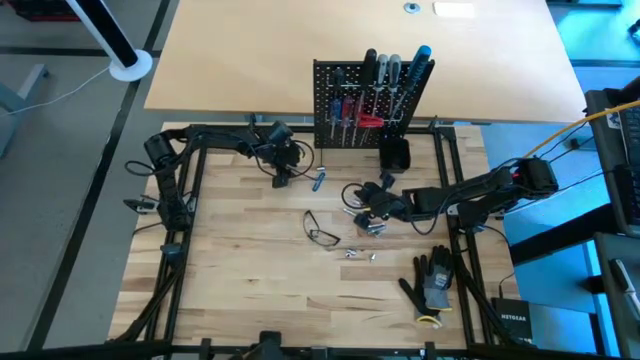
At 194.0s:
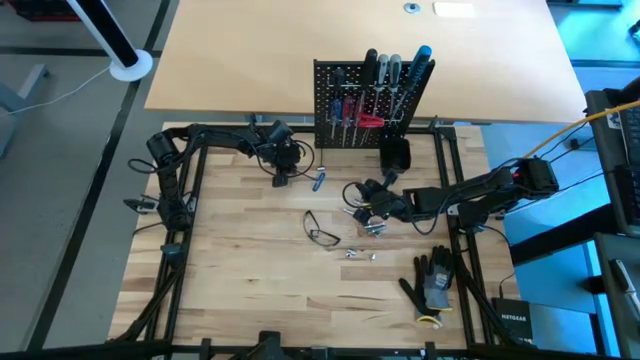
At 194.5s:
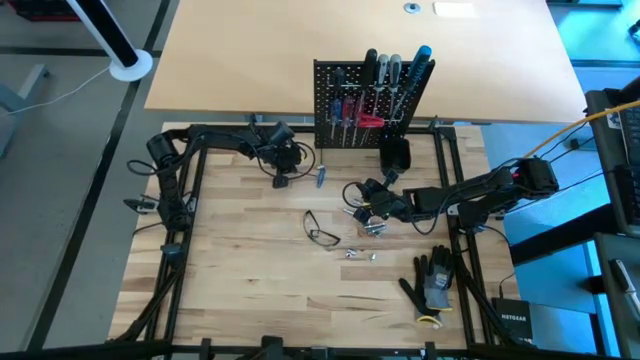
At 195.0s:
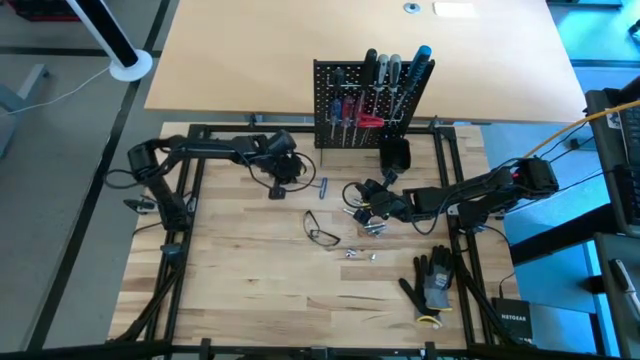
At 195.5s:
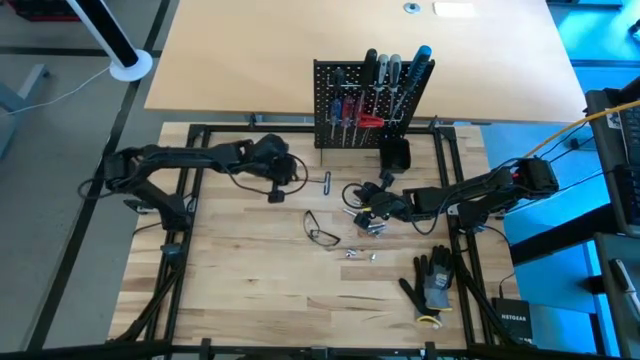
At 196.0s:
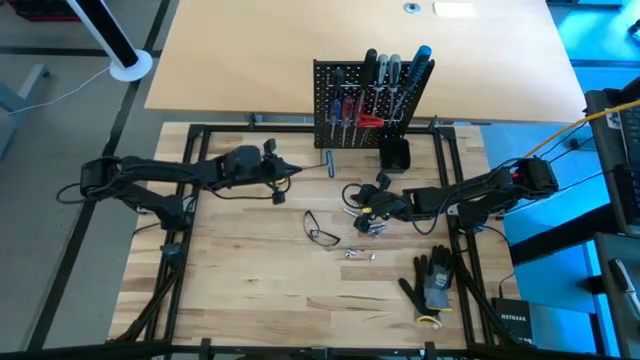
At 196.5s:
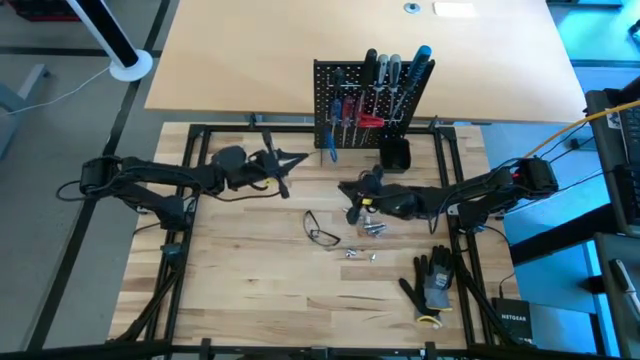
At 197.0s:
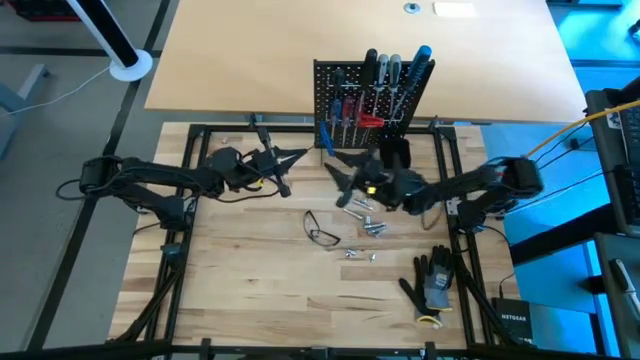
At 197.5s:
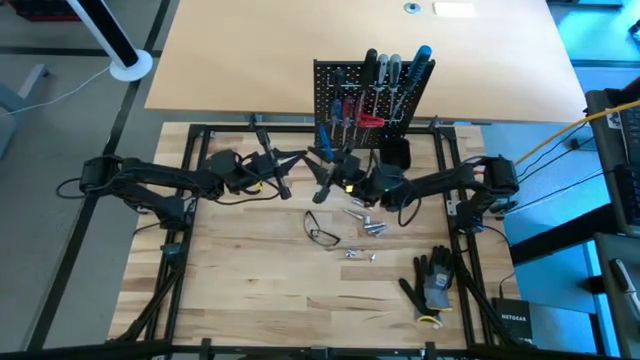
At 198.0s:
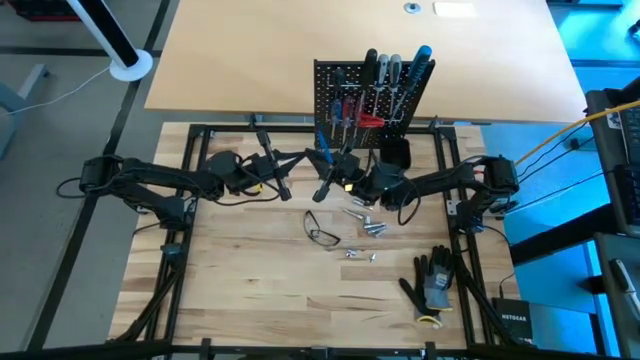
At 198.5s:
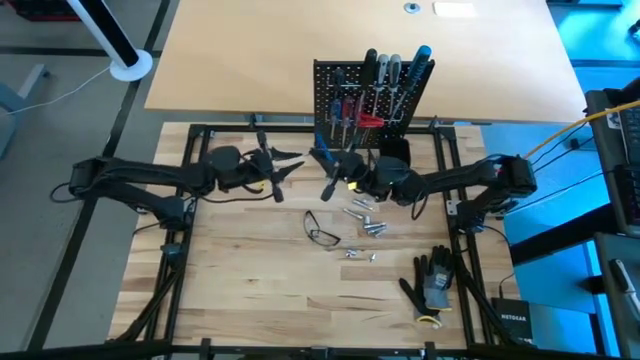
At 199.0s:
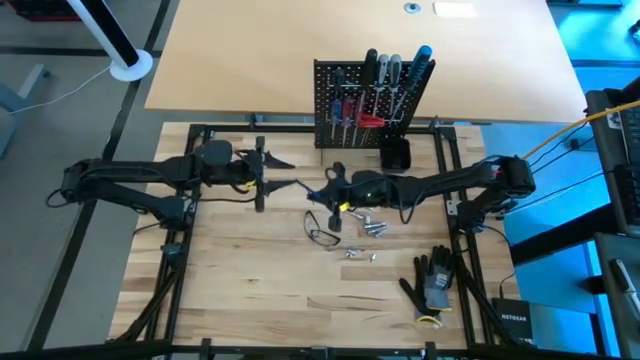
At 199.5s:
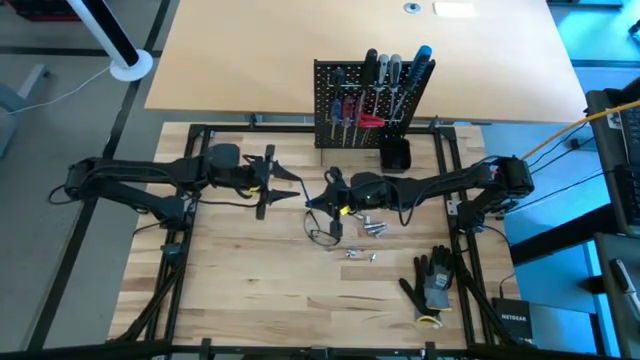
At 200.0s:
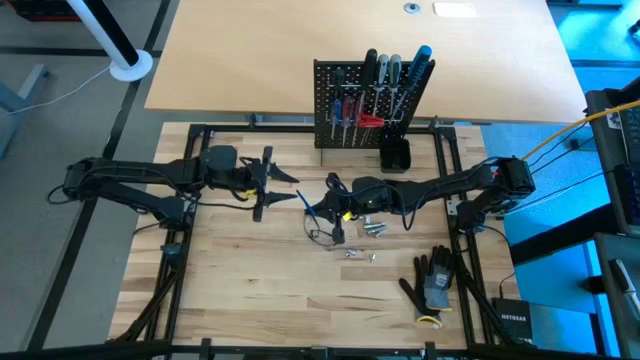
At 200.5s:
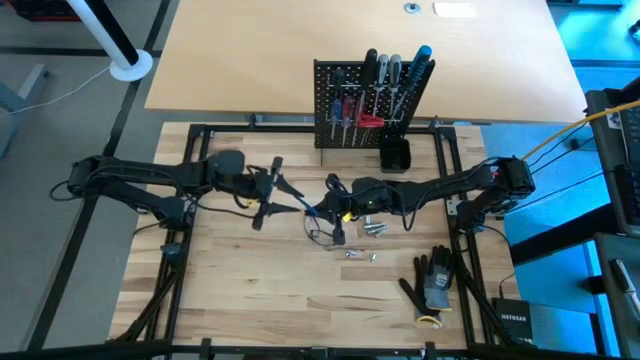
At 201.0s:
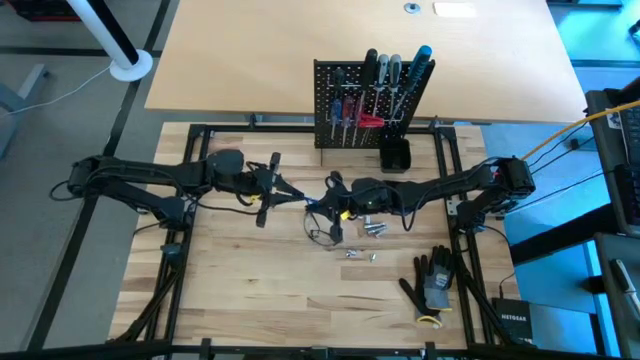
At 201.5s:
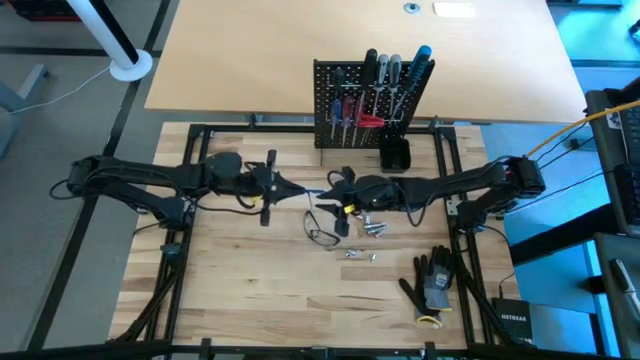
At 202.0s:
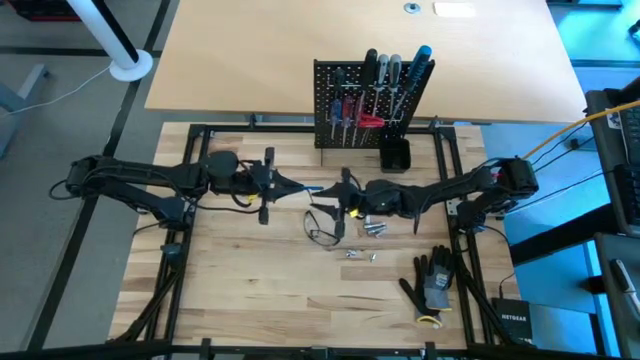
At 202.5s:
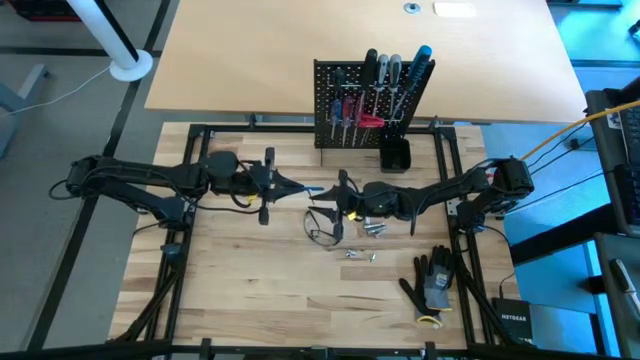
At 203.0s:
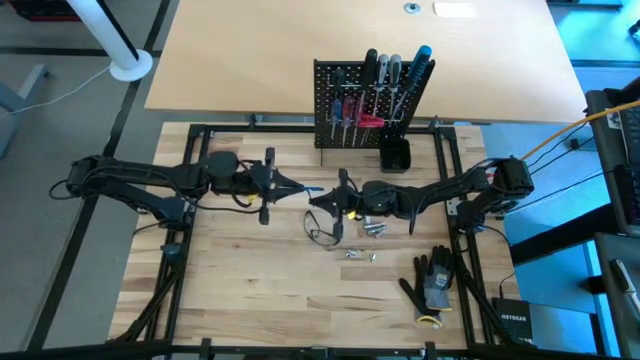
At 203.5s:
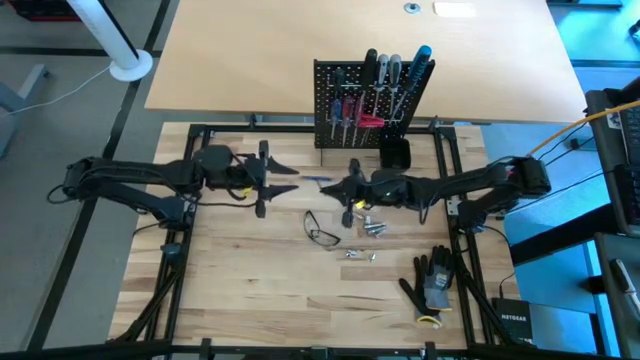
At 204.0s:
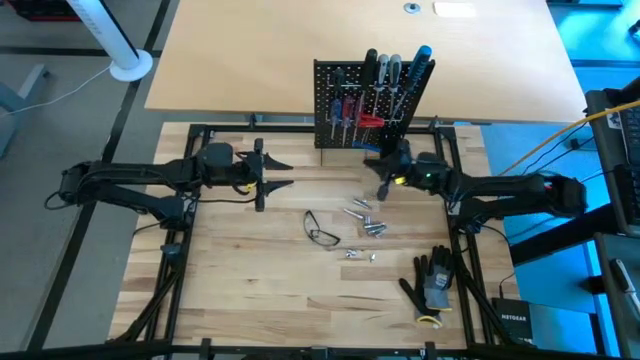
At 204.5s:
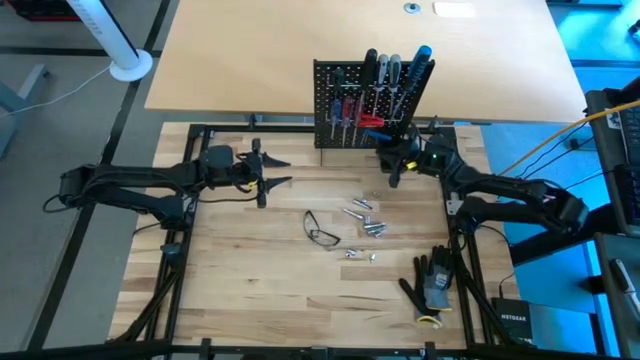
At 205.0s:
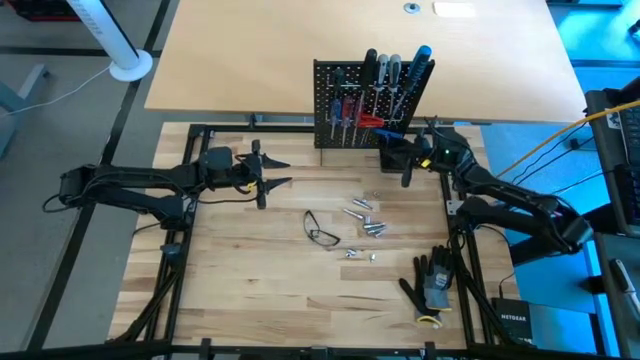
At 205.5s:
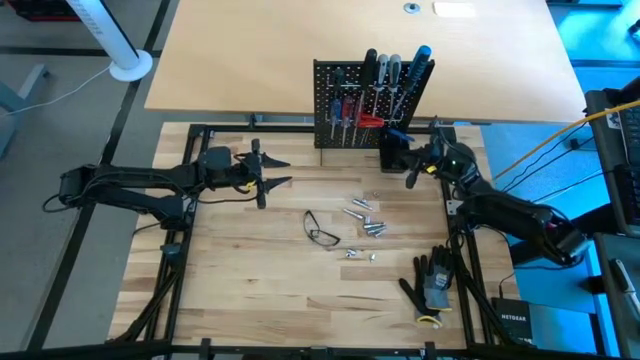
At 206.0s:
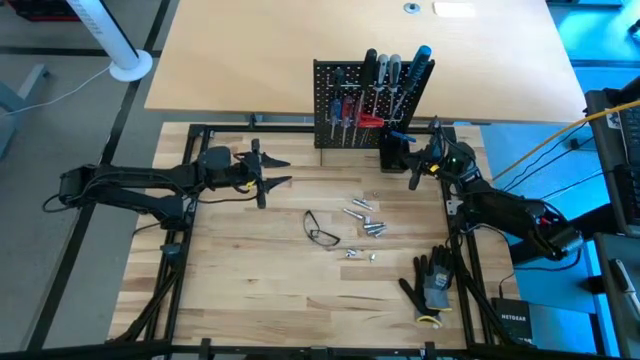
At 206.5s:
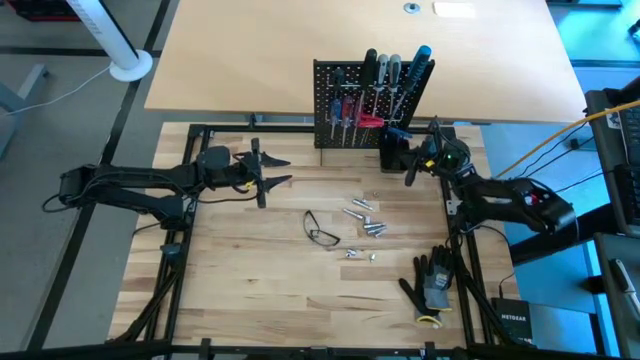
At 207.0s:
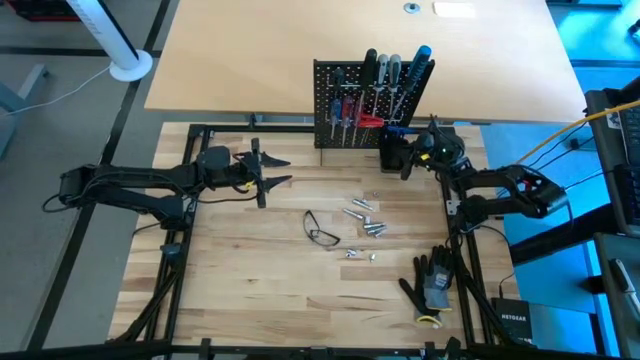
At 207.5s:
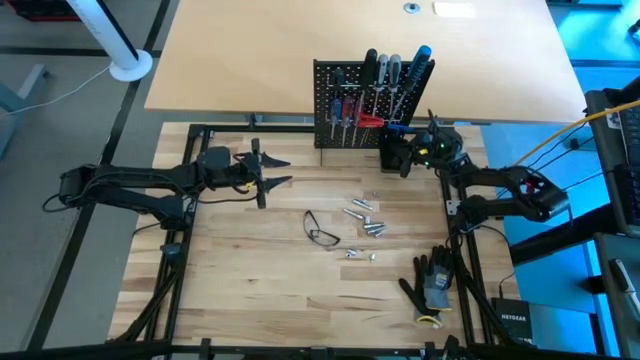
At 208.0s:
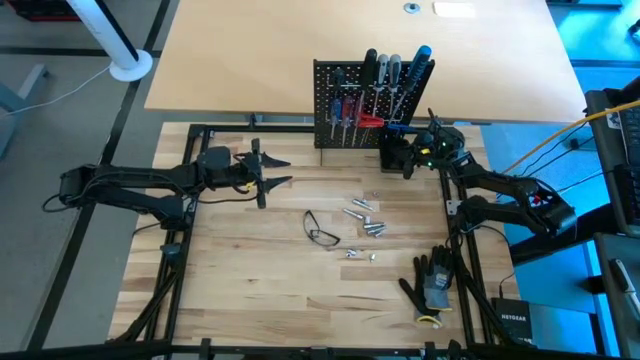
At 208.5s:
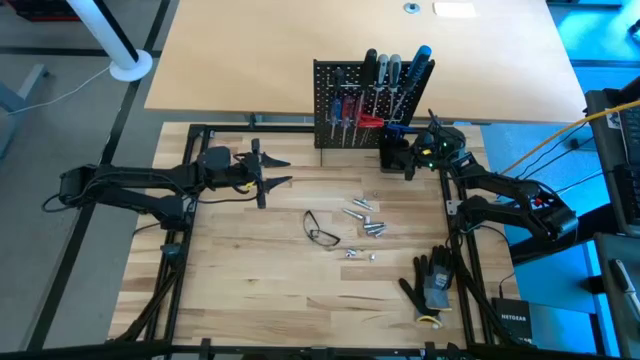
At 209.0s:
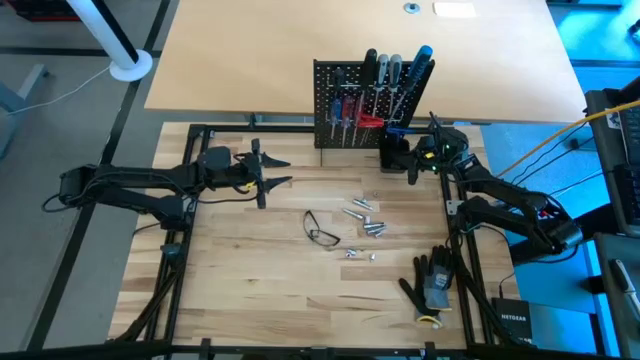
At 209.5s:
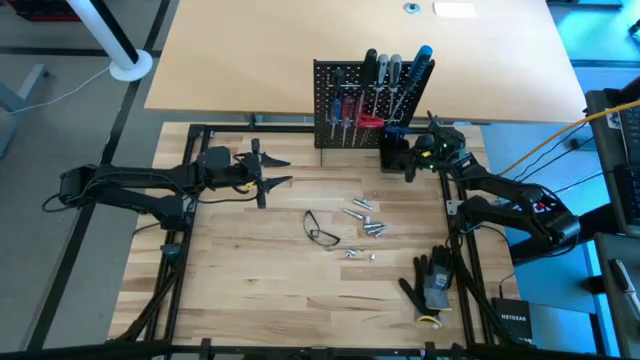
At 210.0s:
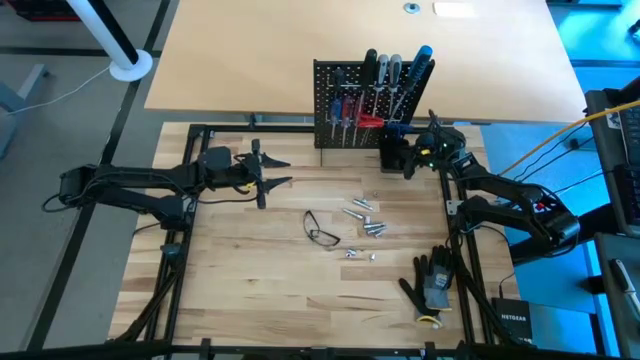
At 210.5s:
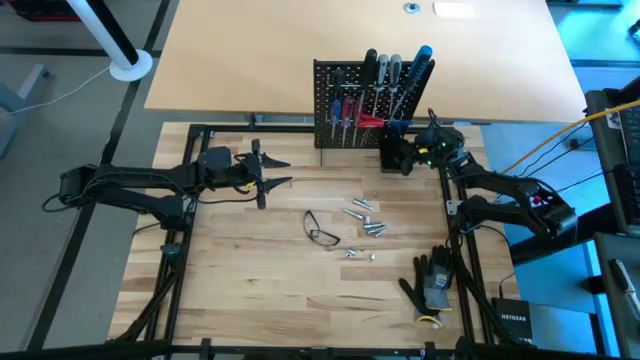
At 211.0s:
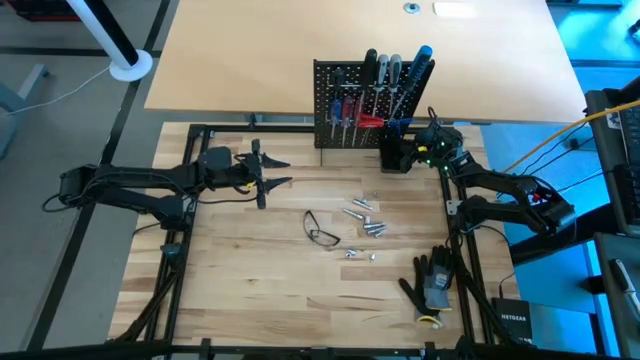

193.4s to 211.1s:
Task: Hang tools onto peg board
Hang the blue pick tool on the peg board

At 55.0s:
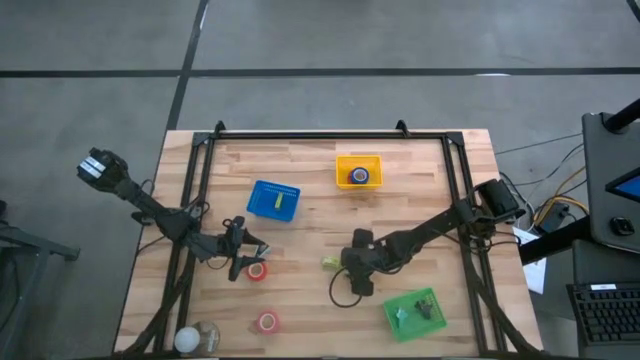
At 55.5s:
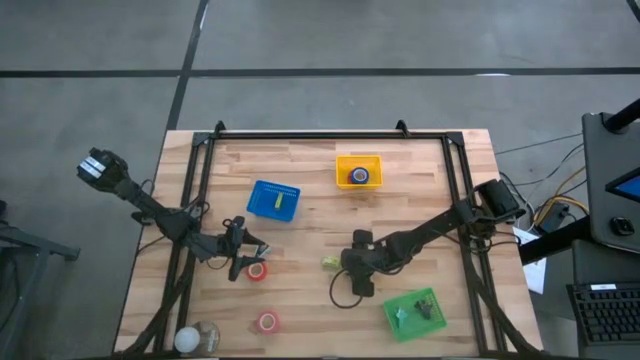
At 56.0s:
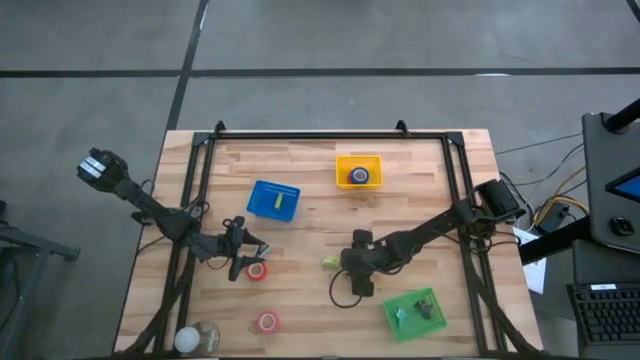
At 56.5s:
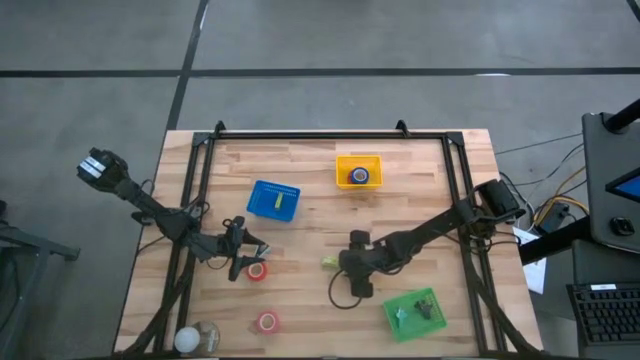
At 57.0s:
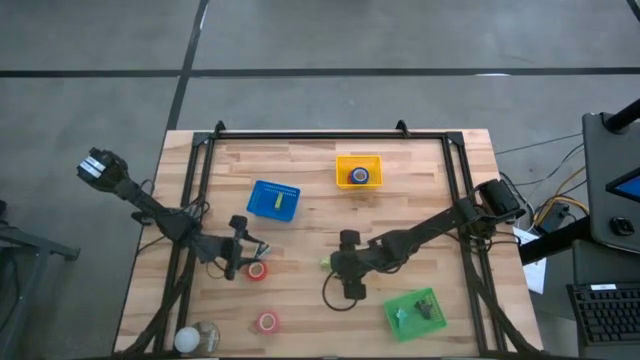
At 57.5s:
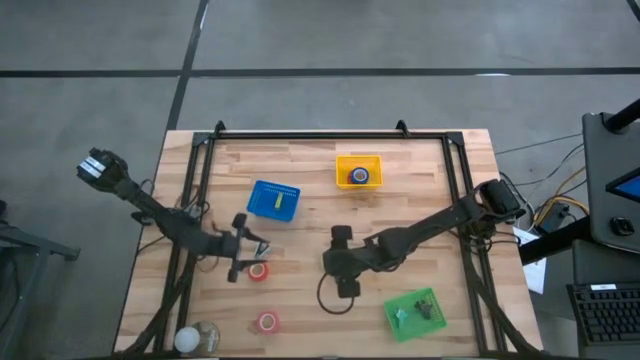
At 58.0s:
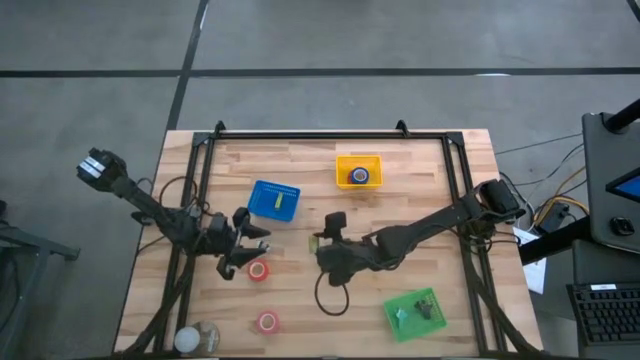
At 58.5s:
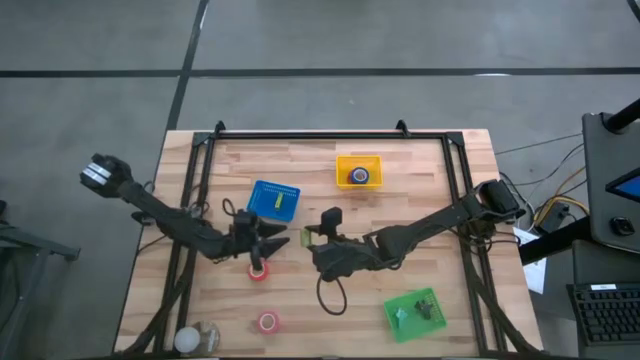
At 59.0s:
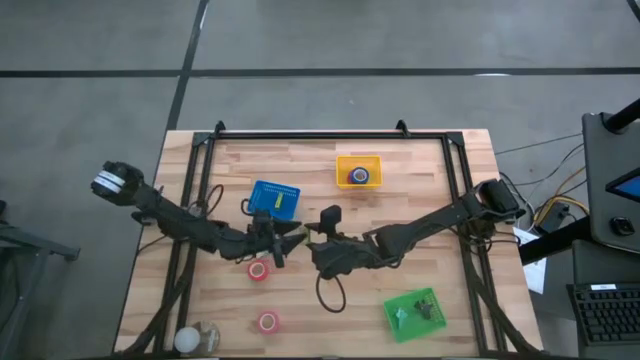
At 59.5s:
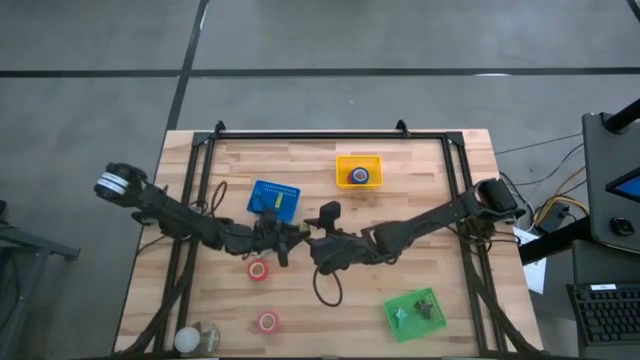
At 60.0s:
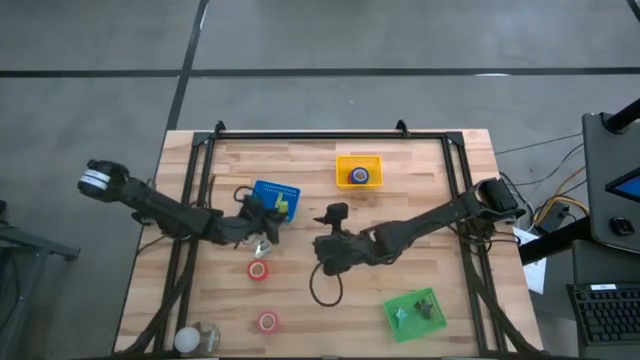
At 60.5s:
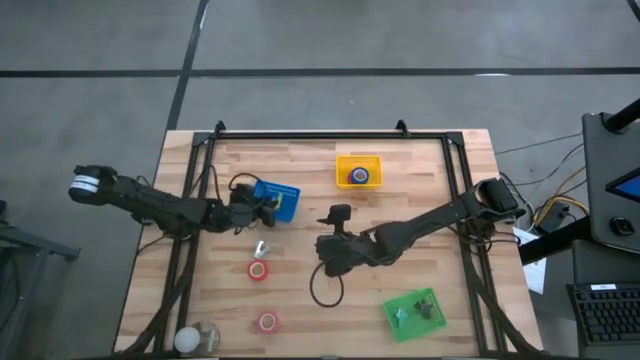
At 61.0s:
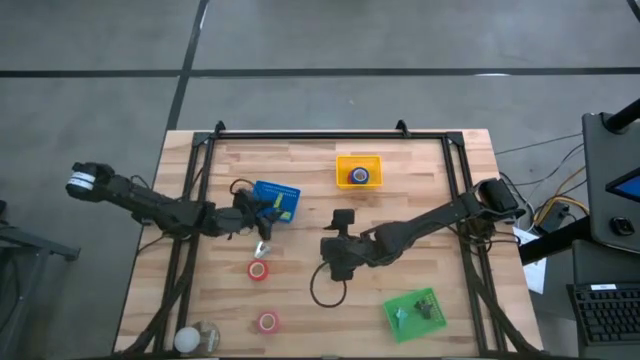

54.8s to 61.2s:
Task: Pick and place Stapler, Stapler remover, tape
Put the right green stapler pin box into the blue bin
